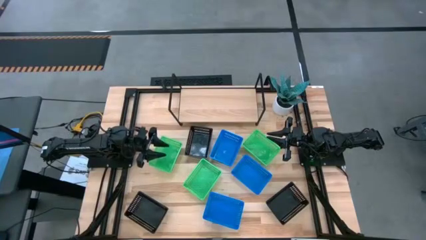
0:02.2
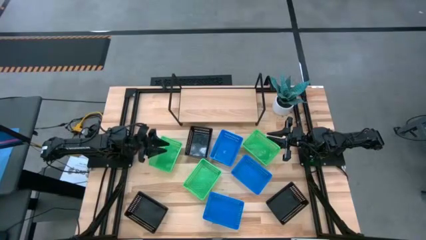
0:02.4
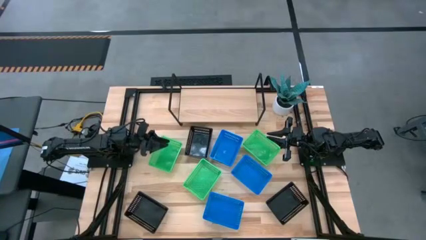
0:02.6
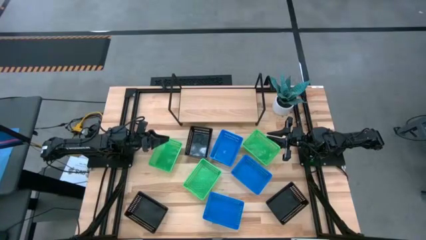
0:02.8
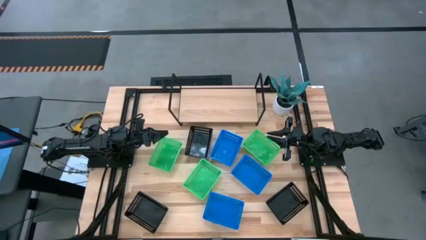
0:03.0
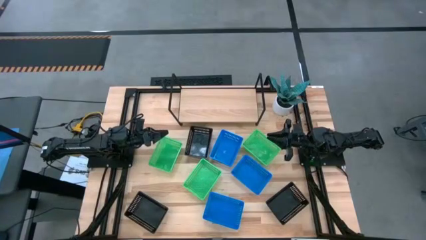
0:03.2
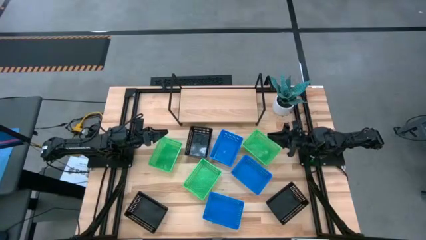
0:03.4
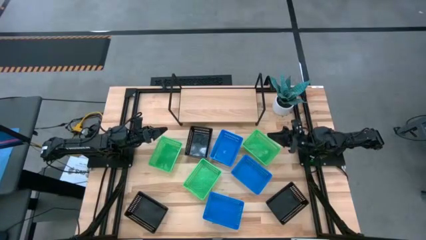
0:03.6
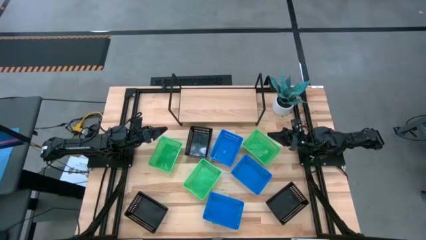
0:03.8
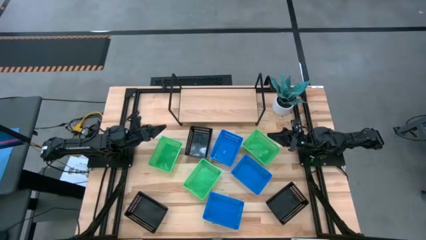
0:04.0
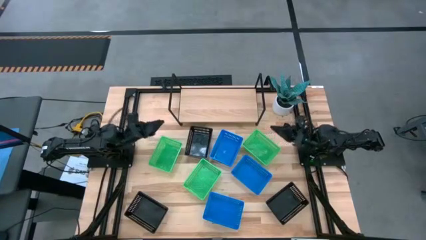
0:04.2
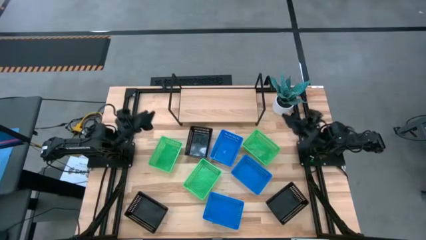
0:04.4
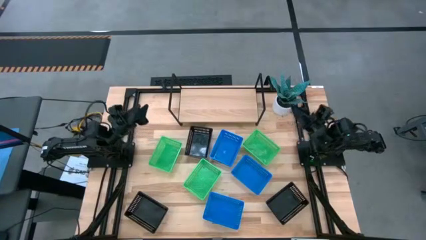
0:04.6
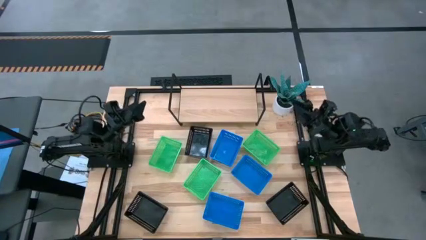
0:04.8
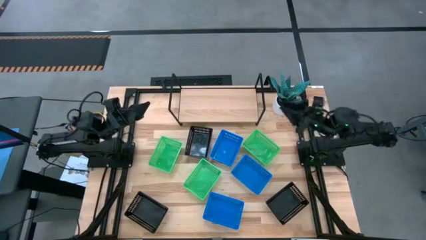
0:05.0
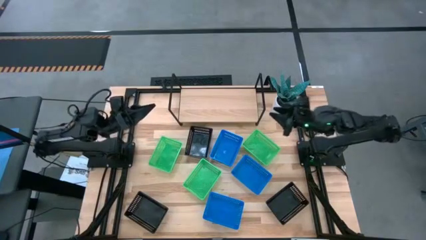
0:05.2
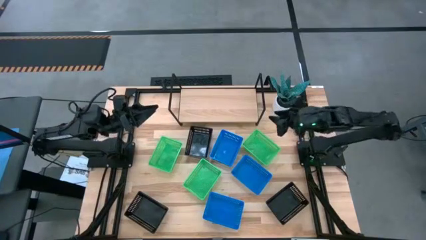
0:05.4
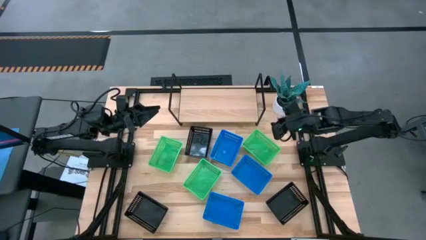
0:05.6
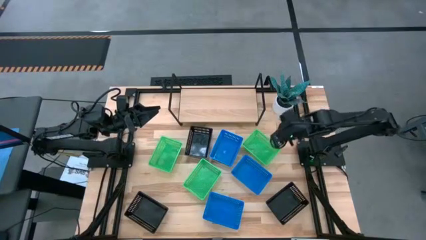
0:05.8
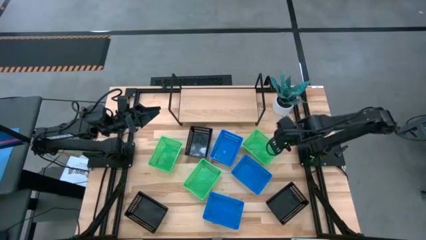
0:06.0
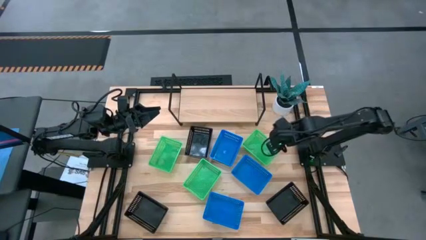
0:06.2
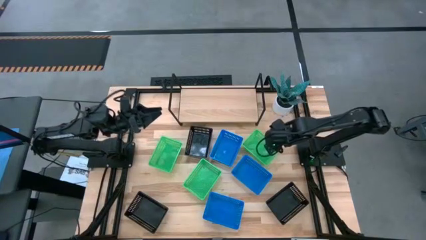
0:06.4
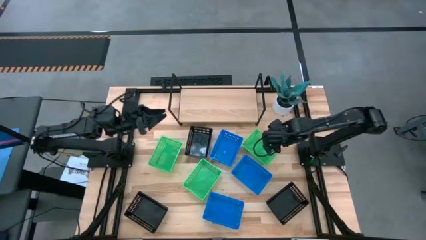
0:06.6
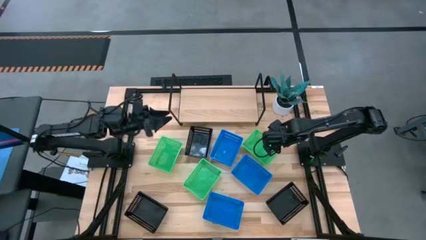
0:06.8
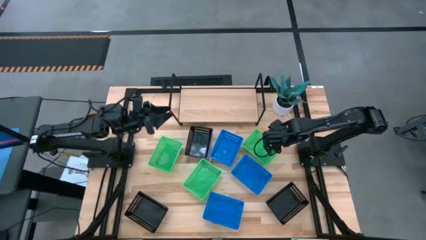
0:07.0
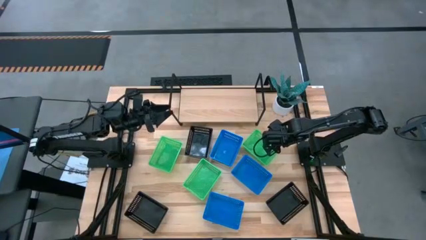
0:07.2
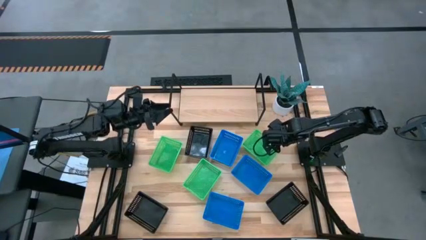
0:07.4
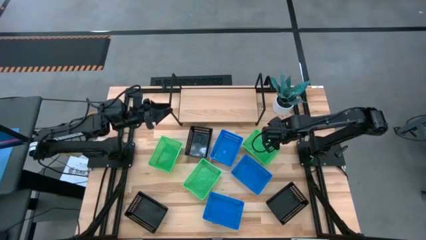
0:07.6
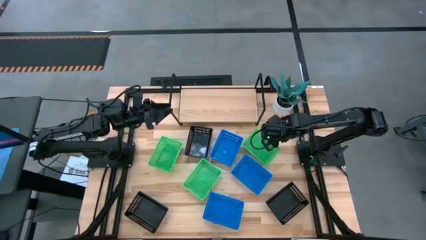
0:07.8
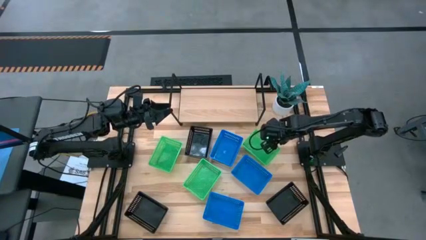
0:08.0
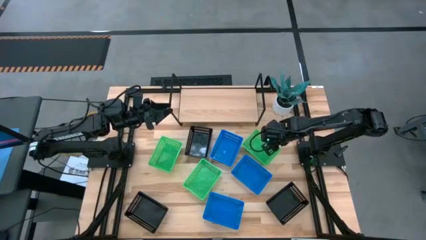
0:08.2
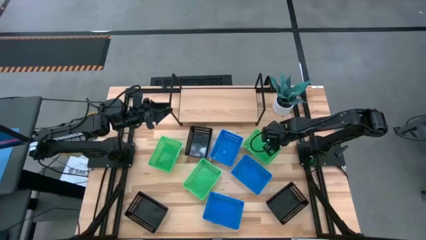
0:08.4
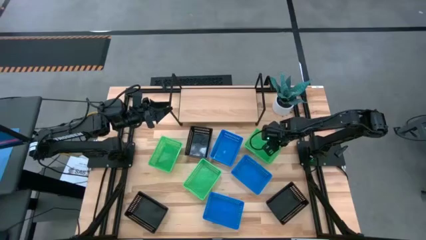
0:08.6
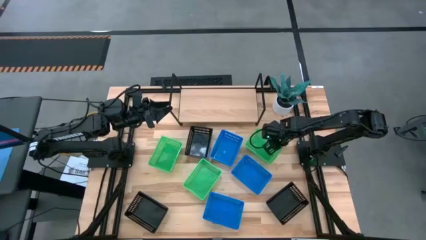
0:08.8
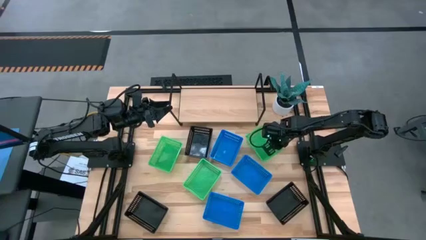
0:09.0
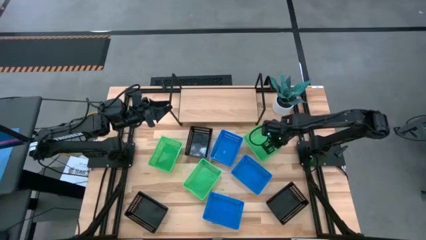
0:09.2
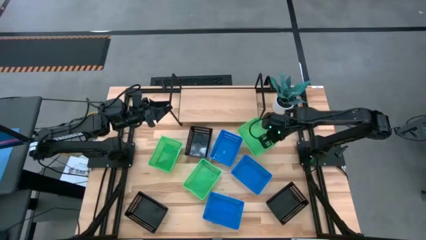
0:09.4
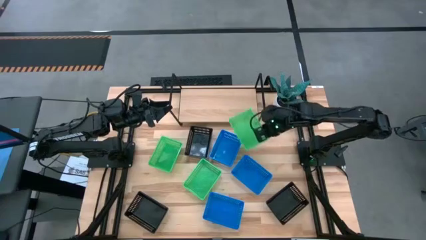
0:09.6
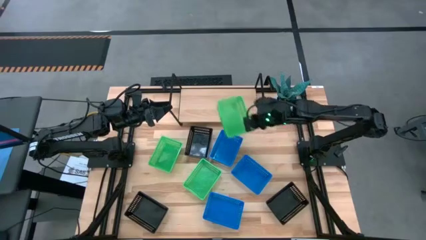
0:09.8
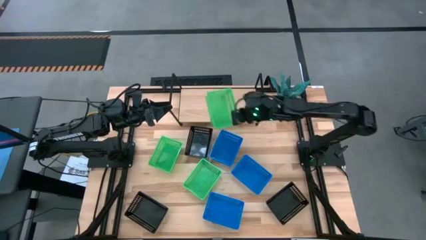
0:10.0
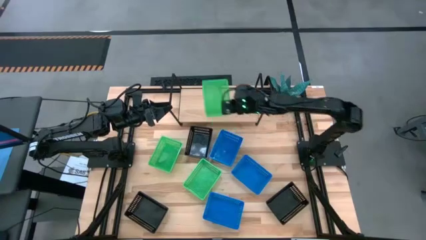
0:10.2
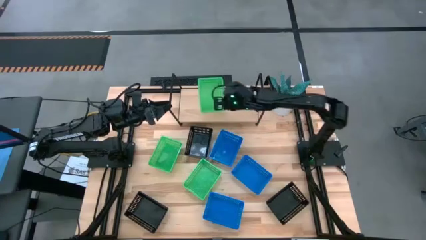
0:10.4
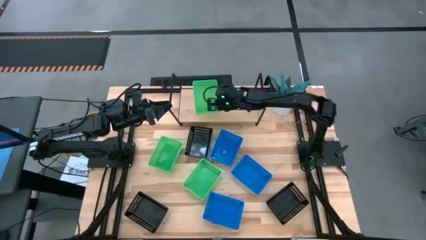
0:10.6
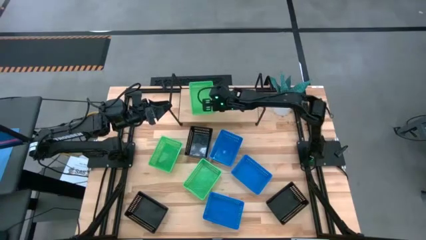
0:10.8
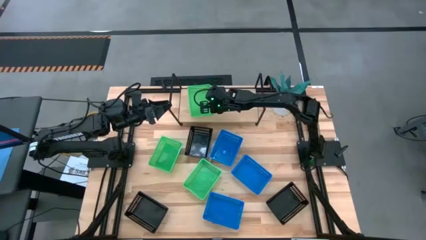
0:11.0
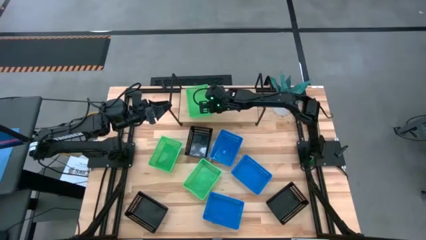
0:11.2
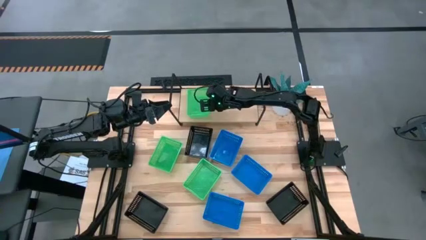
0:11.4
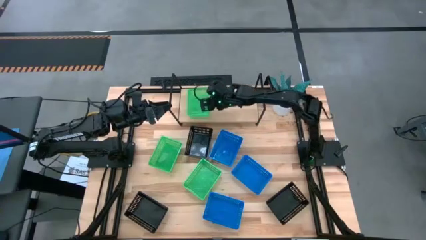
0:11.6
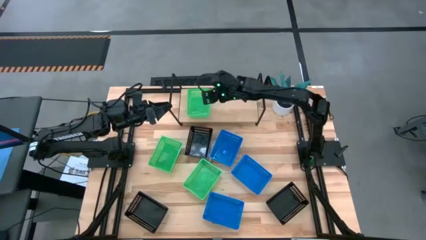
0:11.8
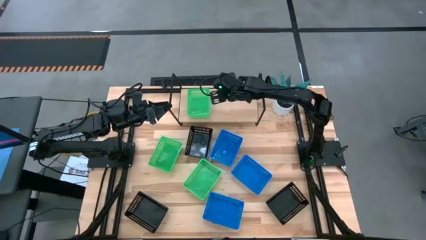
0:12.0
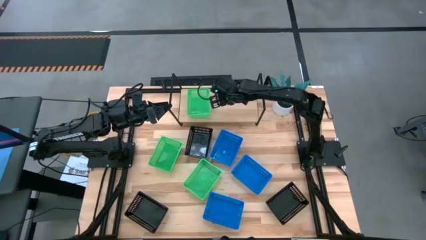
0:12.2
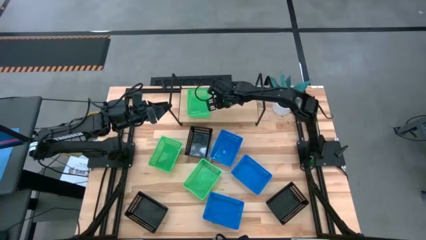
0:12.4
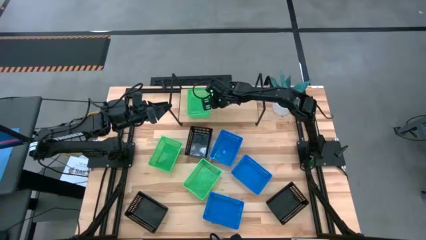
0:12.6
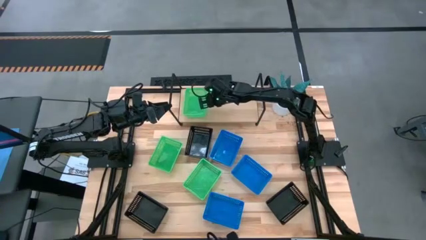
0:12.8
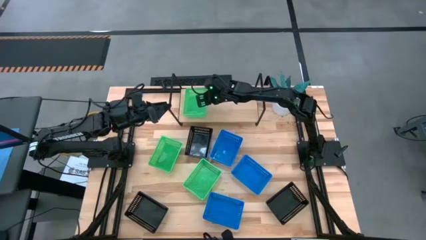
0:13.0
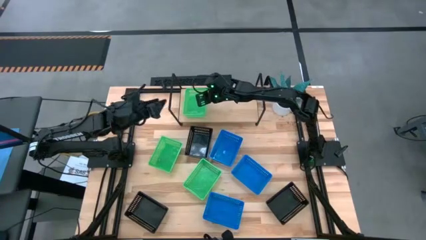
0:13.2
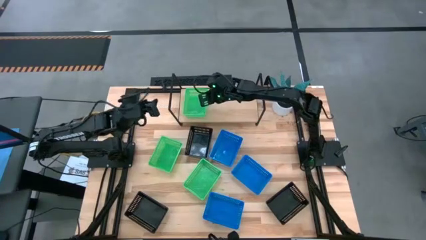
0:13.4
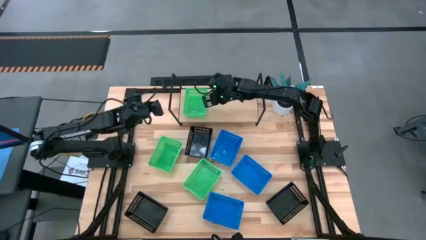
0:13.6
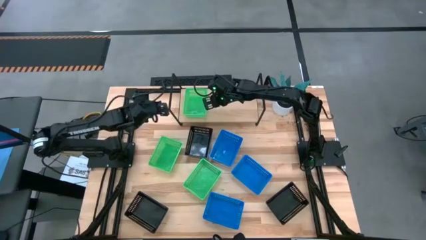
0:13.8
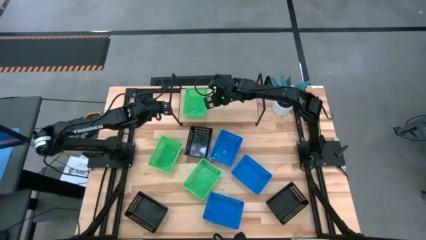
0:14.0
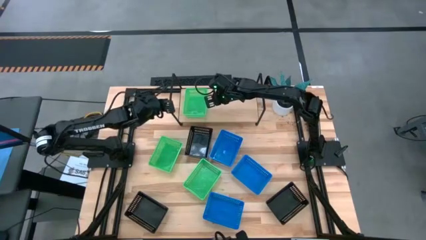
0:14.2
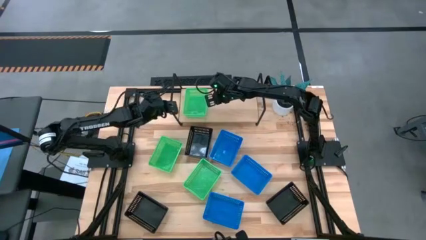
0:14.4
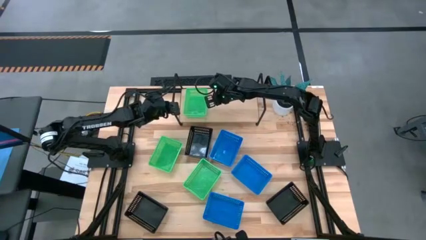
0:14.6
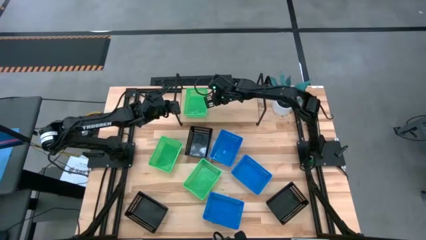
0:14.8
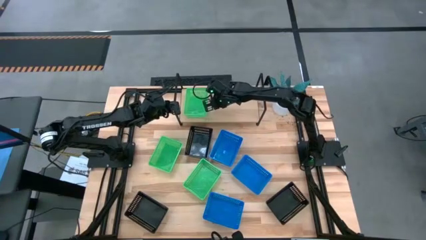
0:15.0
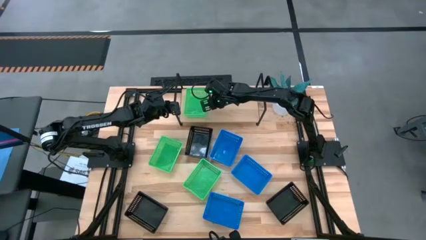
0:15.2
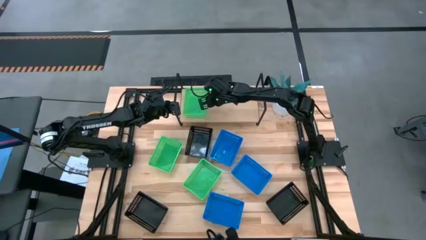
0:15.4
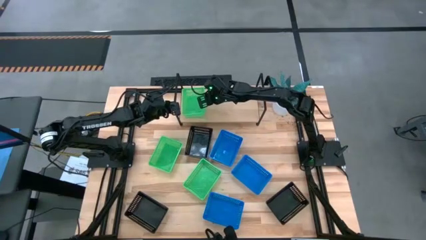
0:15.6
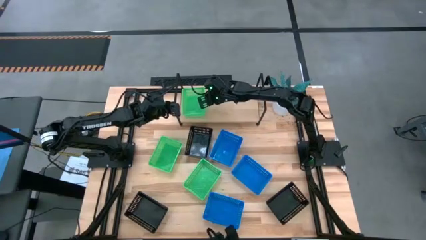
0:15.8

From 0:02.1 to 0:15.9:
Task: Stack baskets on shelf by color
Put the right green bin on the shelf
